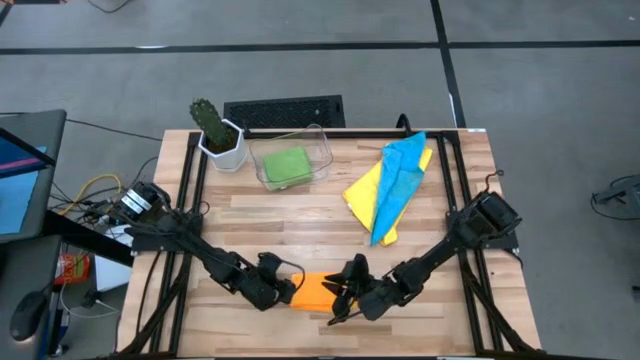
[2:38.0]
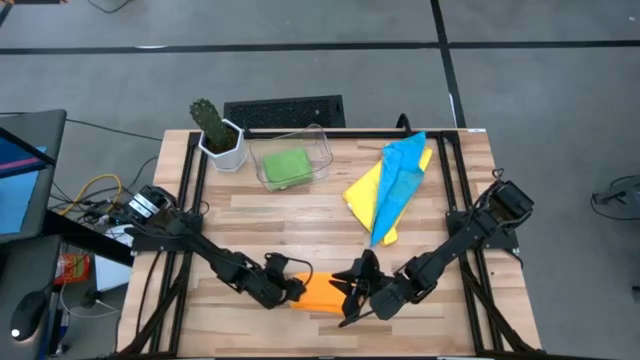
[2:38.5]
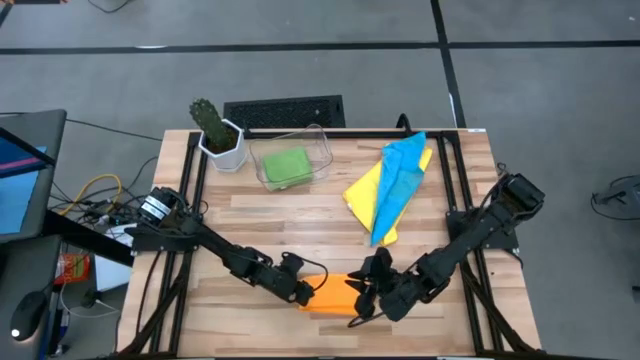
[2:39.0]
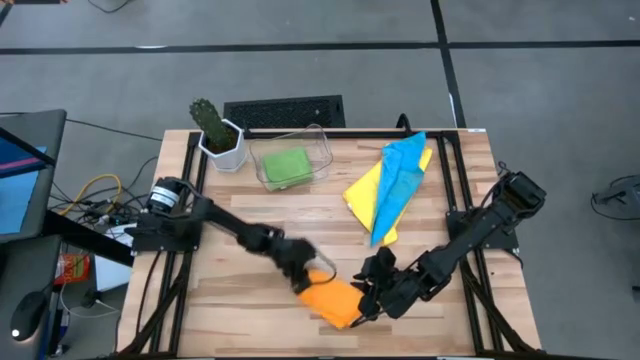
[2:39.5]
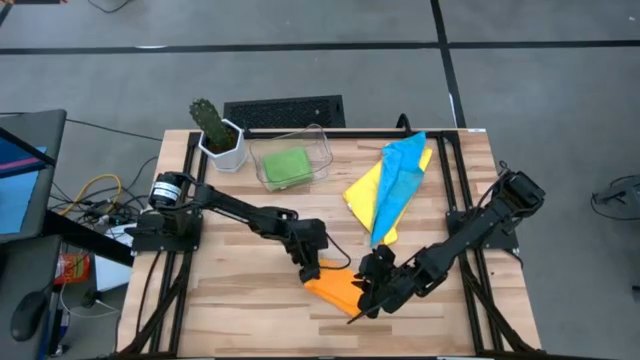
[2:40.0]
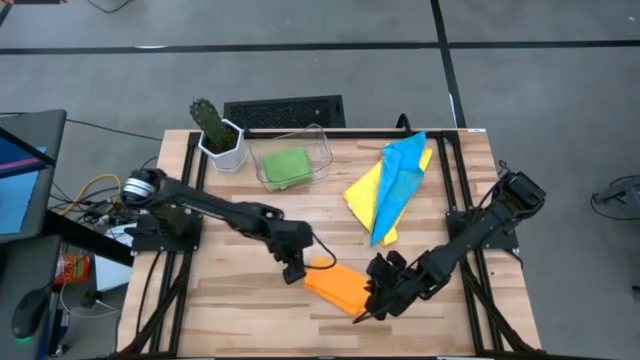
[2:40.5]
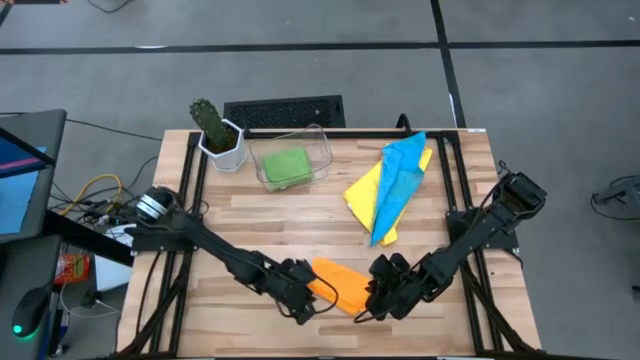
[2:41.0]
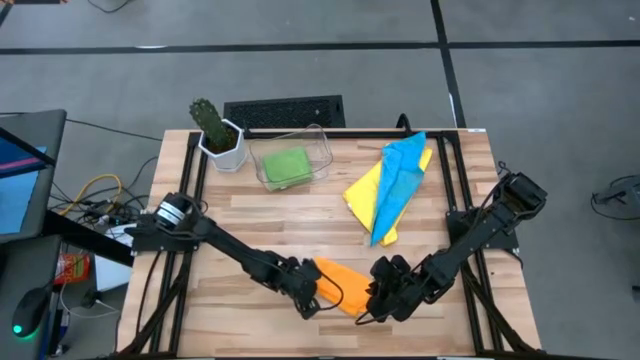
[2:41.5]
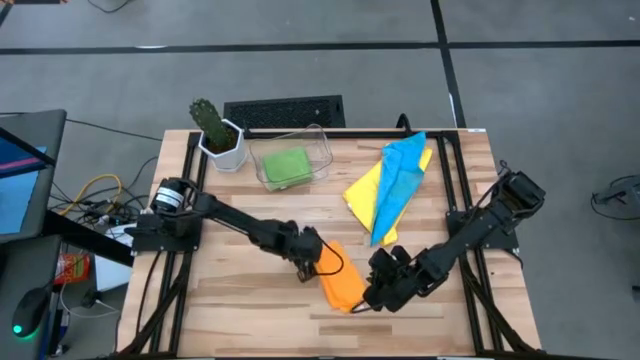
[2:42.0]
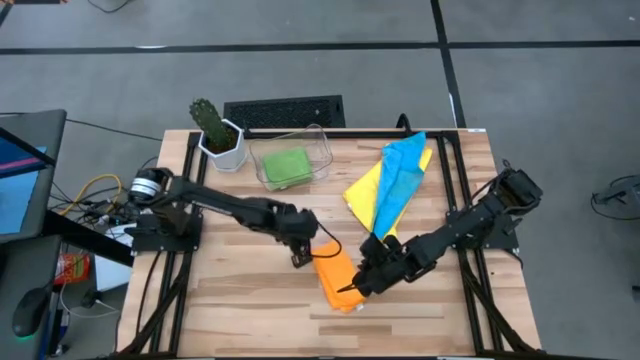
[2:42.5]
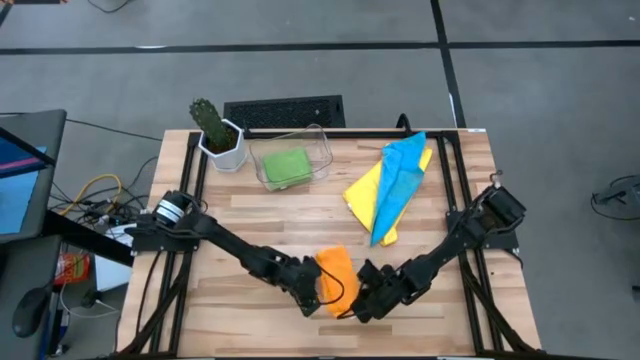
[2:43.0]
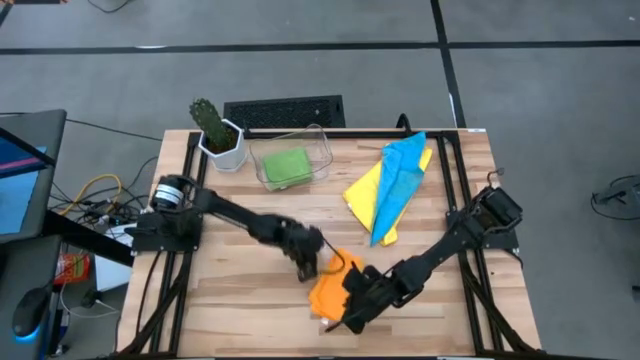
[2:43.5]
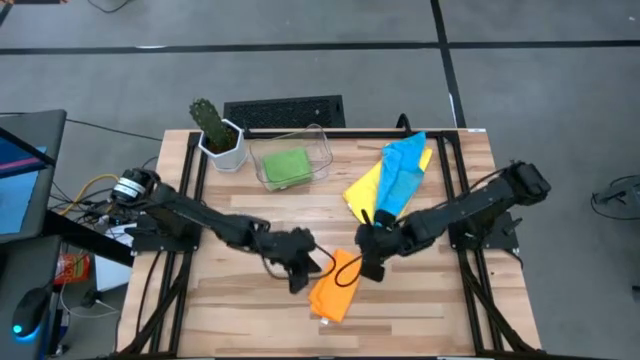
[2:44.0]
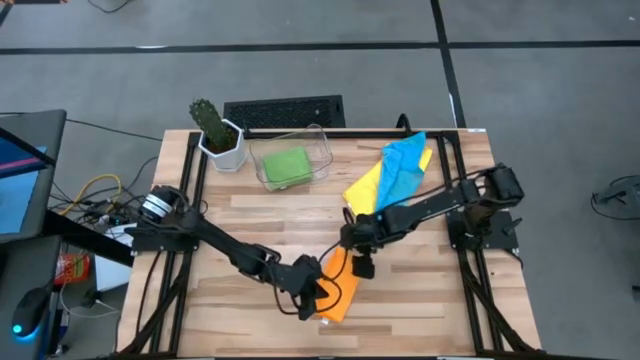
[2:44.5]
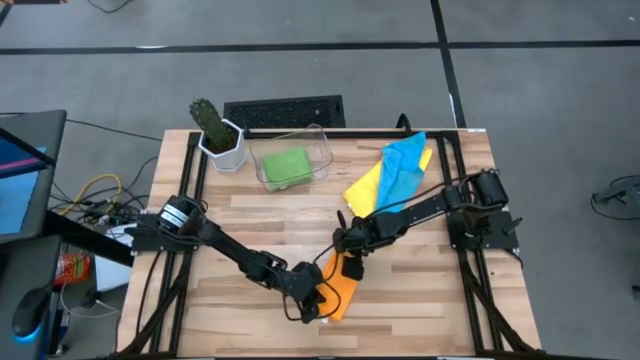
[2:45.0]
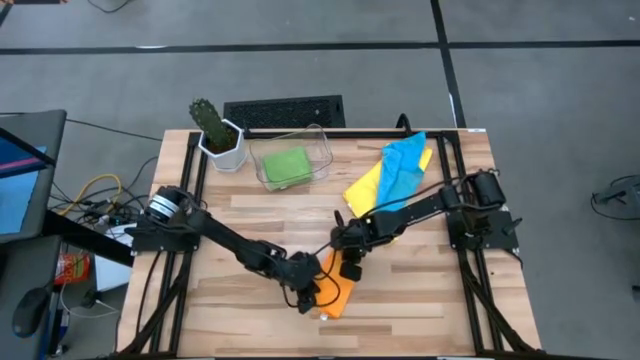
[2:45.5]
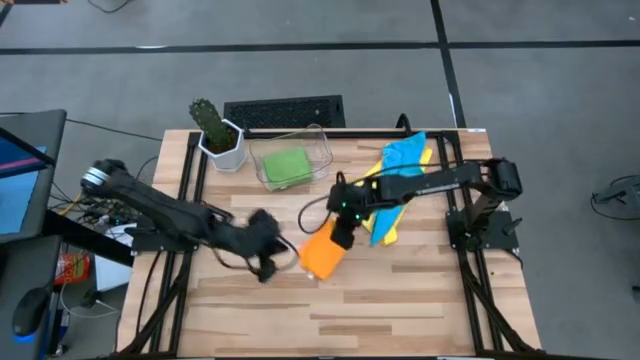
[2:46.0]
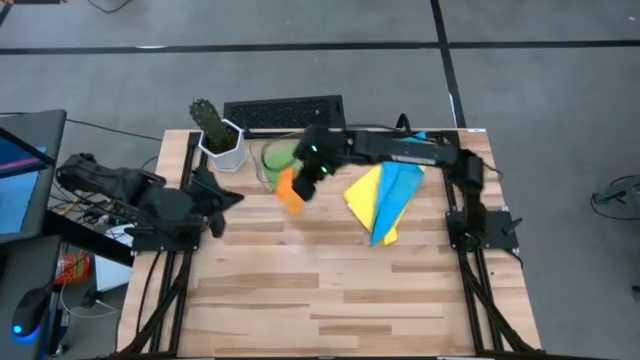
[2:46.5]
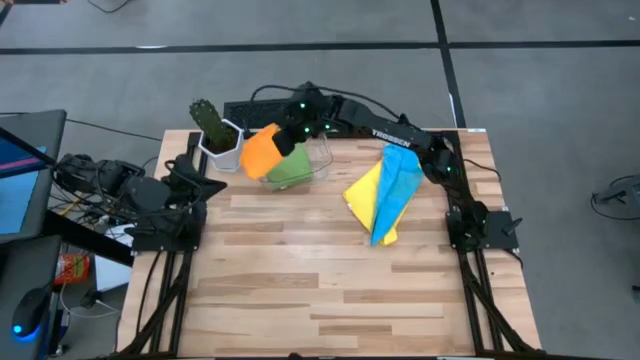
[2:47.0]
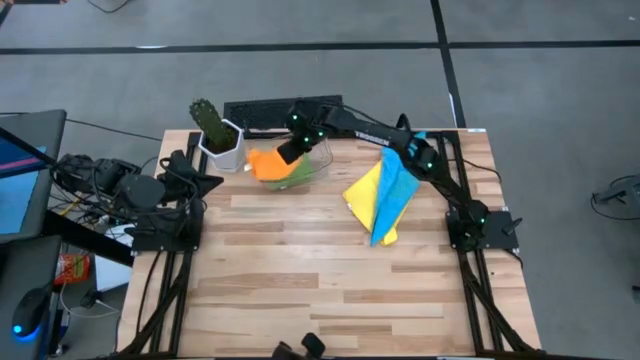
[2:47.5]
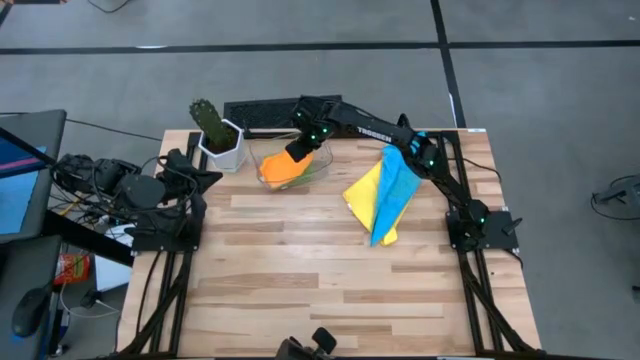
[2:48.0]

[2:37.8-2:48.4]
Task: Fold microfiber towels
Put the orange microfiber cloth into the transparent bin

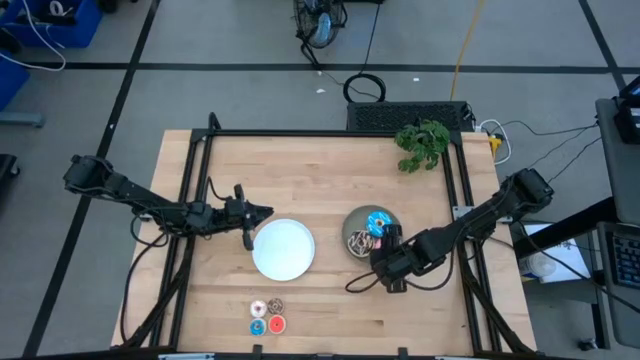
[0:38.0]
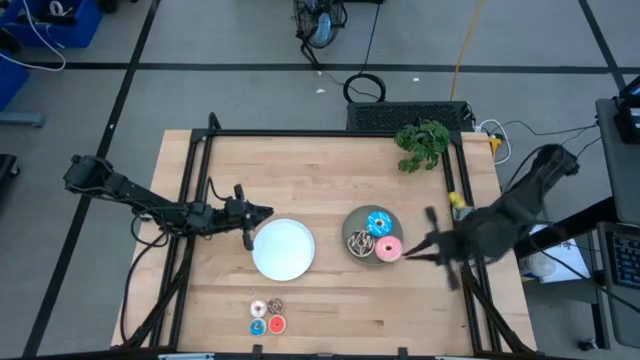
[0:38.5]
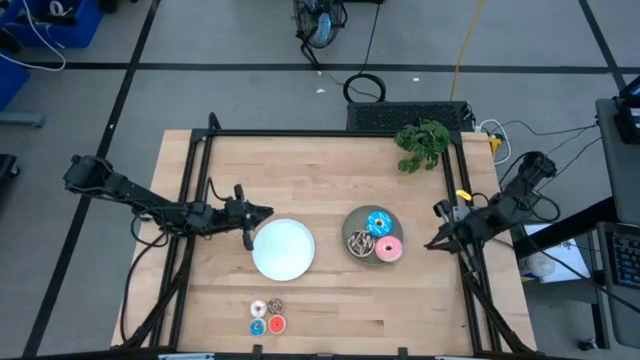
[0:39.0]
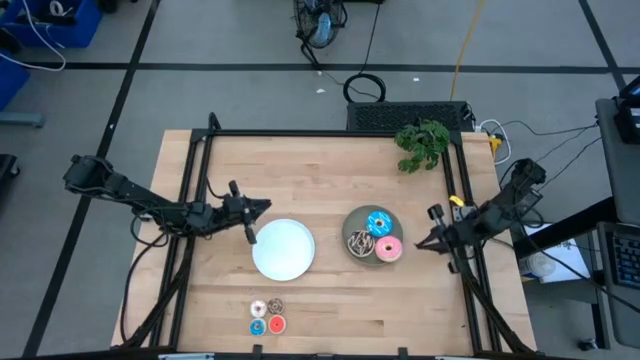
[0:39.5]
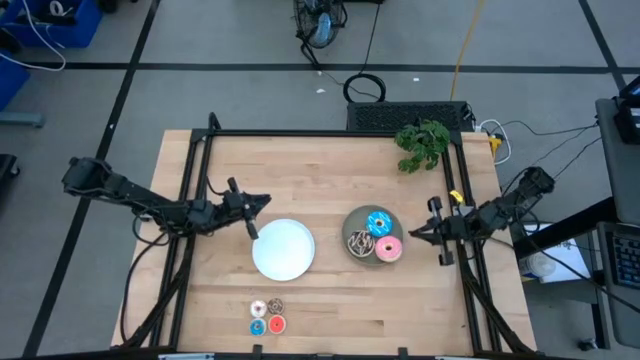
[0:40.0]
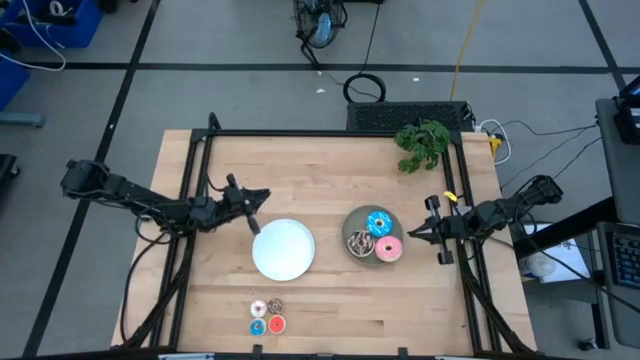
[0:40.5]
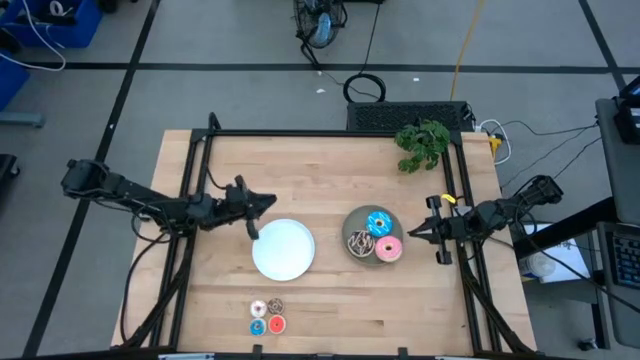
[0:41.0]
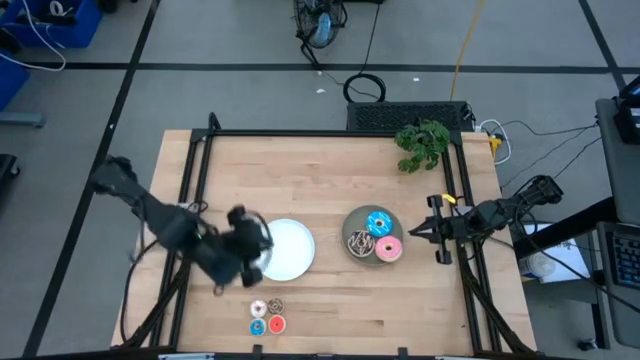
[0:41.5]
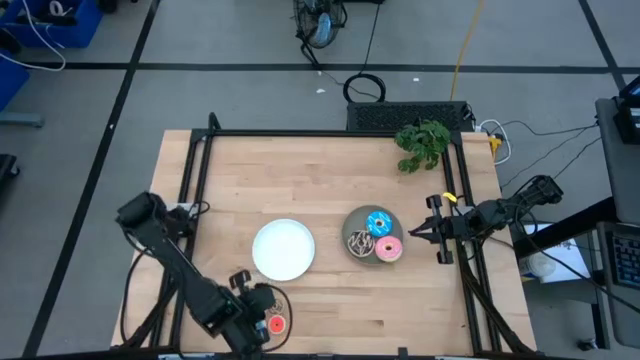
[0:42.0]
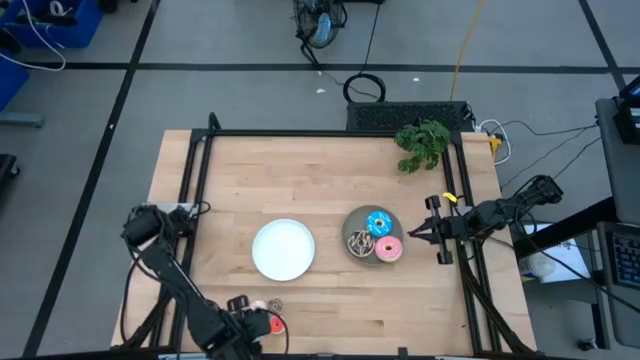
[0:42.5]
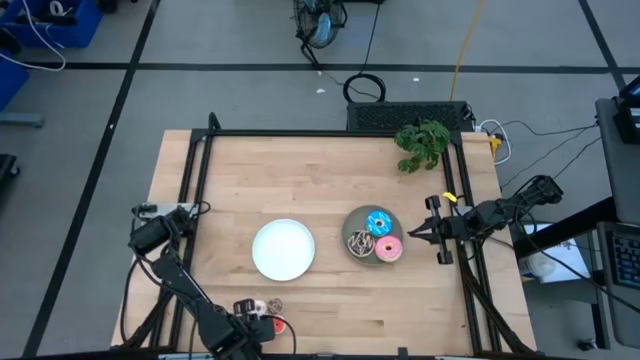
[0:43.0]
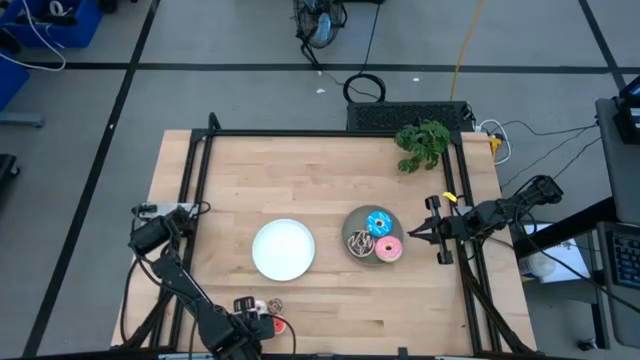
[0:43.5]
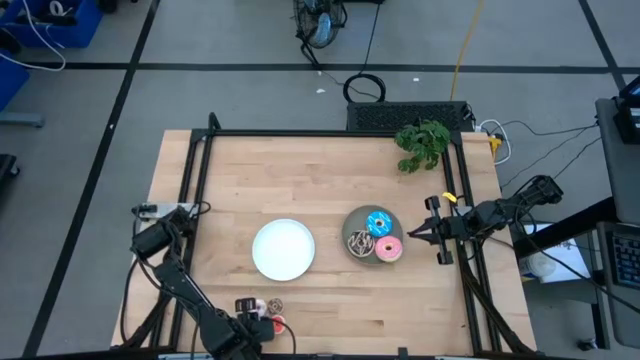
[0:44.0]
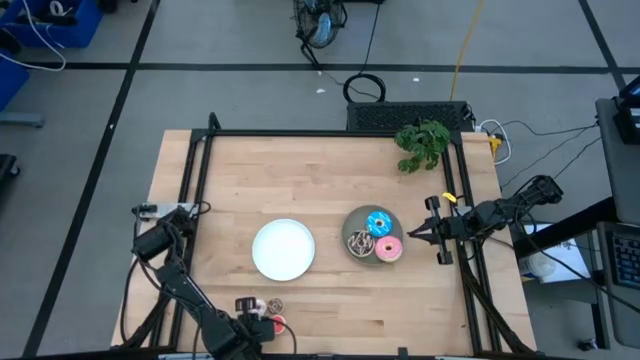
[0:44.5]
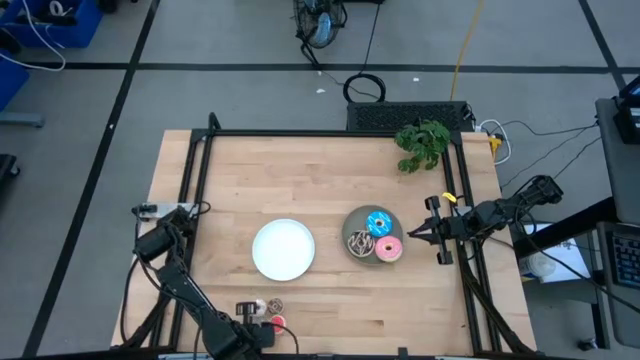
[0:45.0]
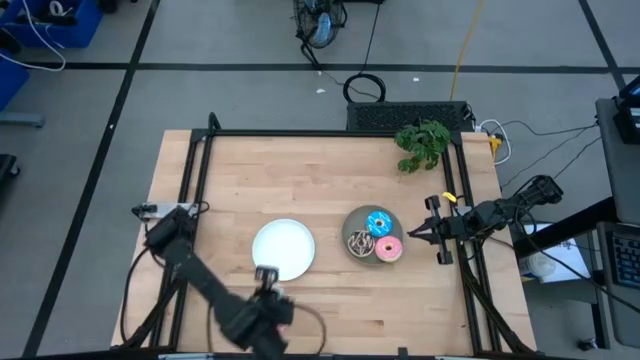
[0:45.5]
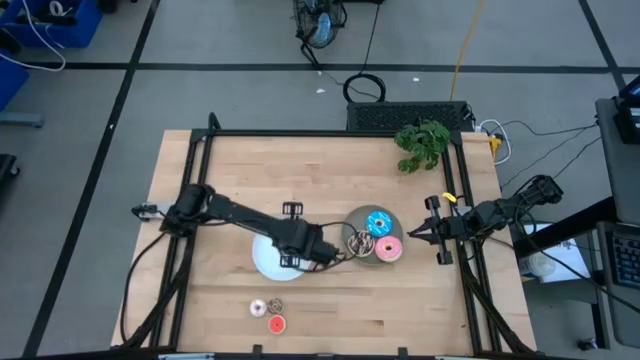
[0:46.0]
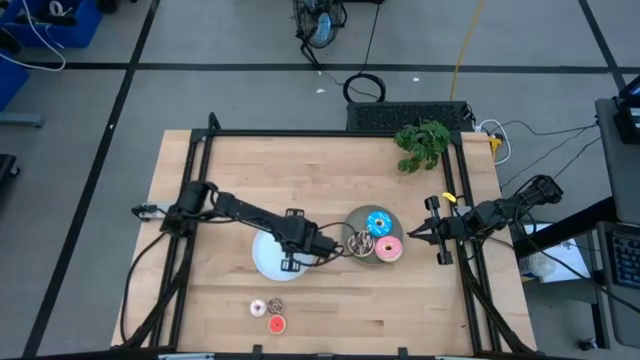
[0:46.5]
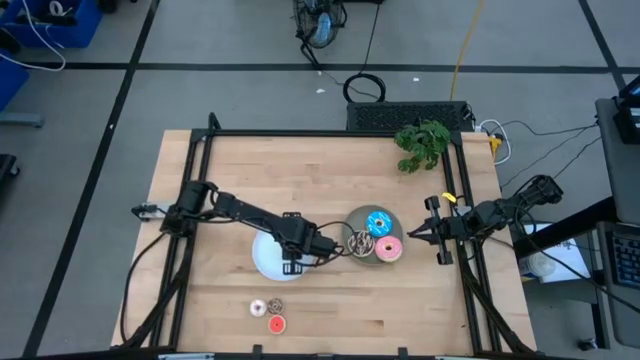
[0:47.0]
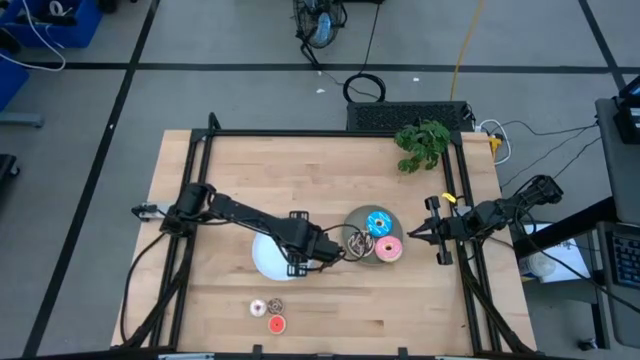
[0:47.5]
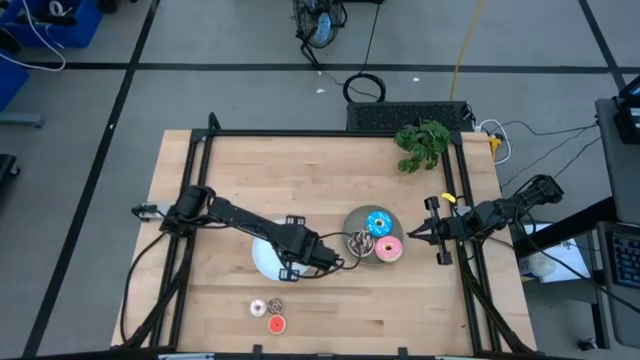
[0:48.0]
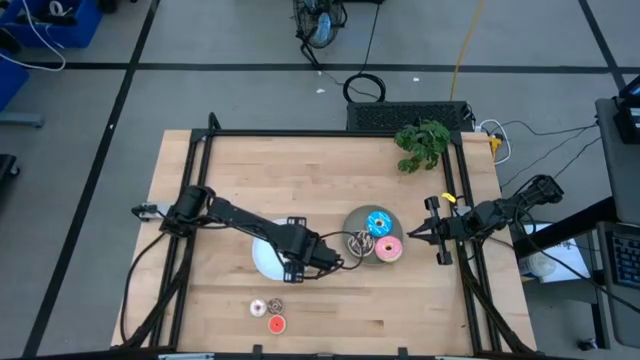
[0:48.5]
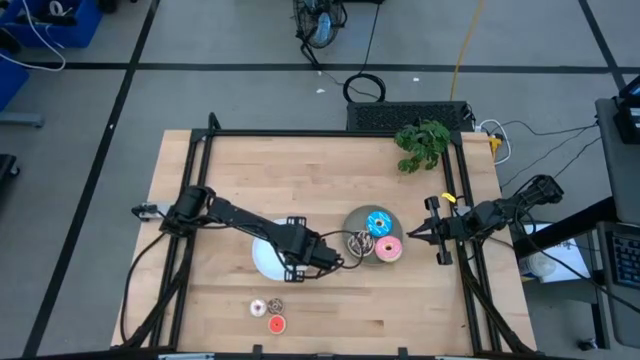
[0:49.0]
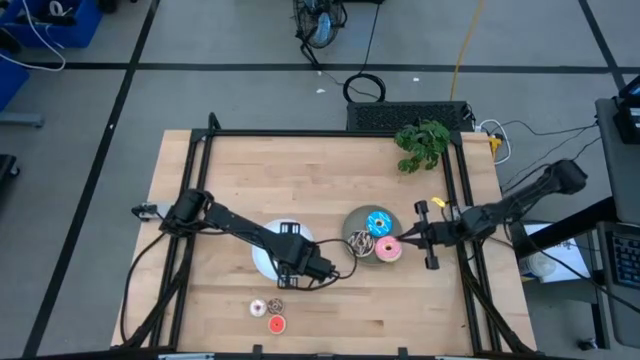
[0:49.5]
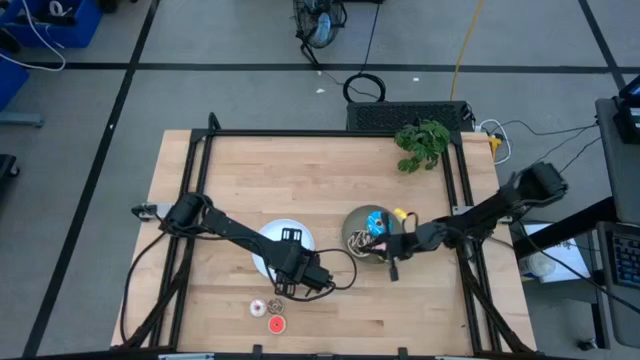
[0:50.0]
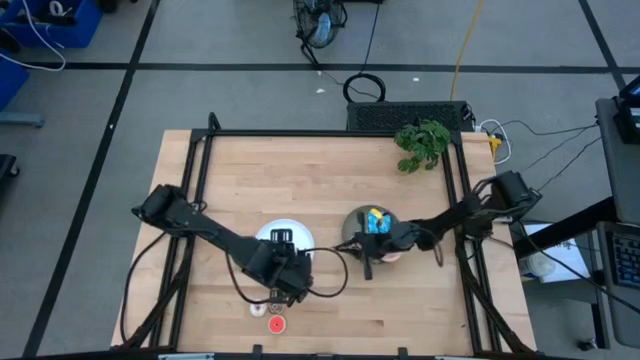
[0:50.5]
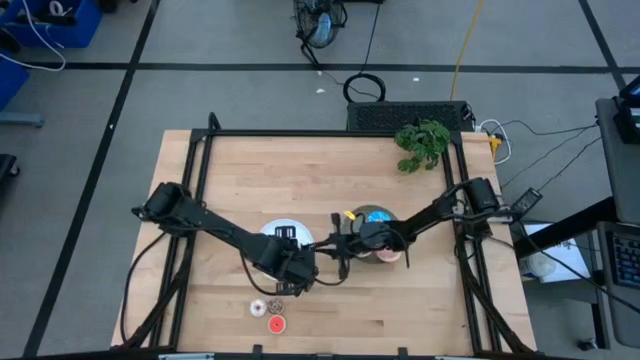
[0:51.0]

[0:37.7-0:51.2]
Task: Pick & Place donuts
Put the small blue donut on the white plate
